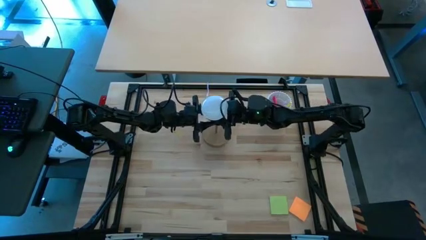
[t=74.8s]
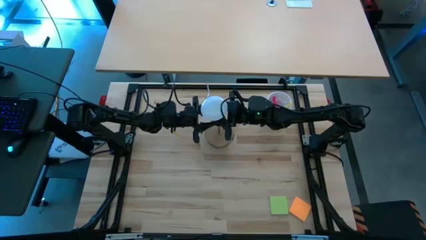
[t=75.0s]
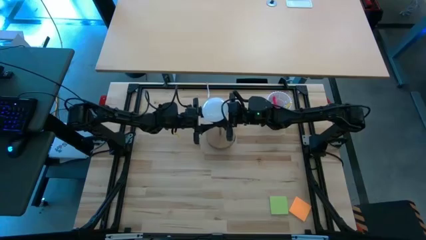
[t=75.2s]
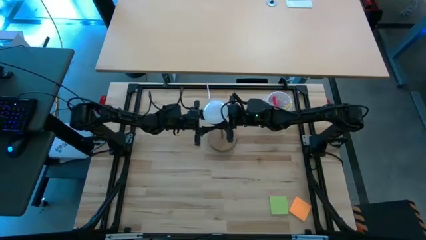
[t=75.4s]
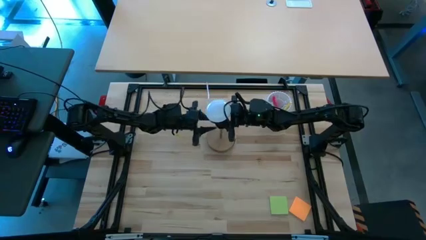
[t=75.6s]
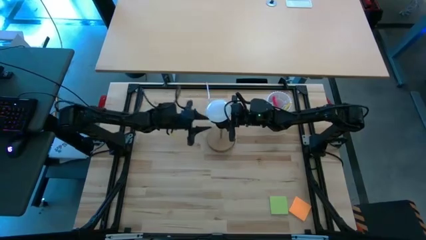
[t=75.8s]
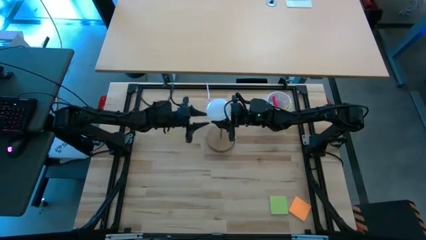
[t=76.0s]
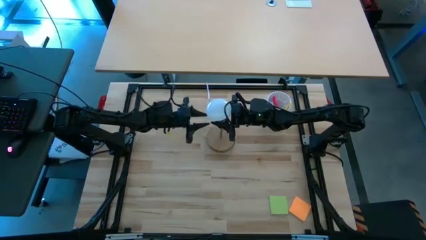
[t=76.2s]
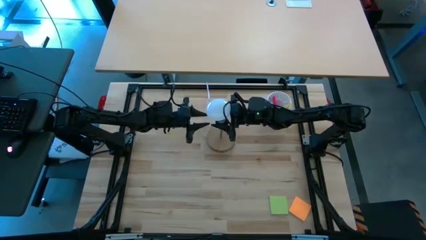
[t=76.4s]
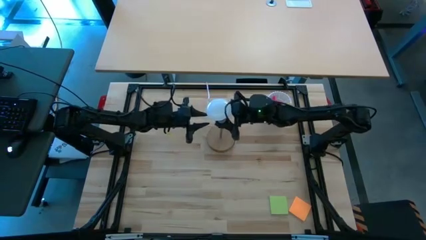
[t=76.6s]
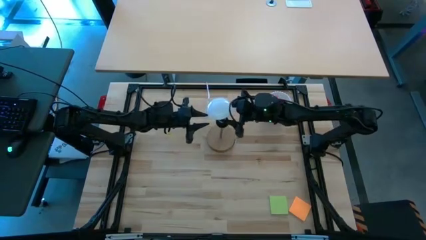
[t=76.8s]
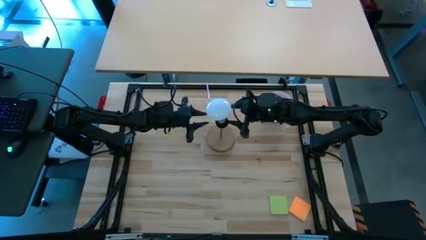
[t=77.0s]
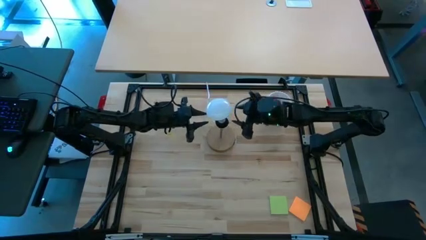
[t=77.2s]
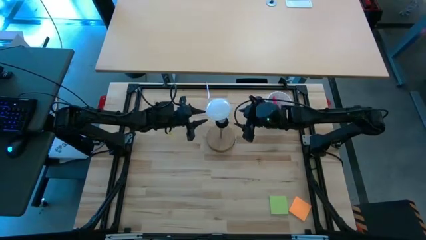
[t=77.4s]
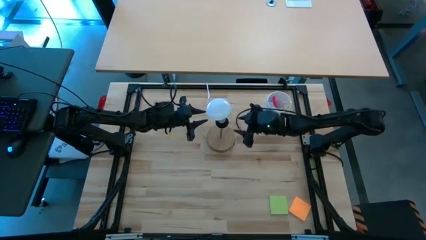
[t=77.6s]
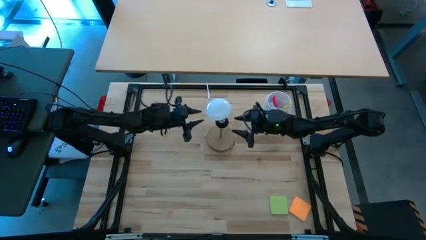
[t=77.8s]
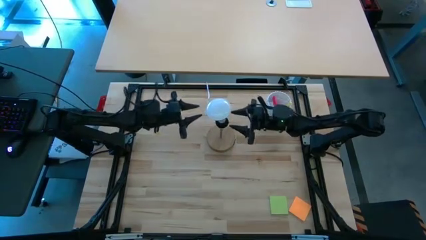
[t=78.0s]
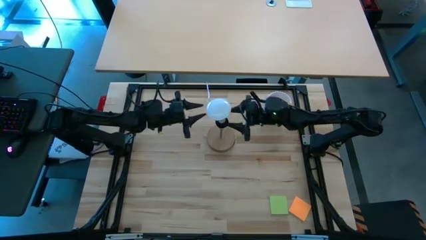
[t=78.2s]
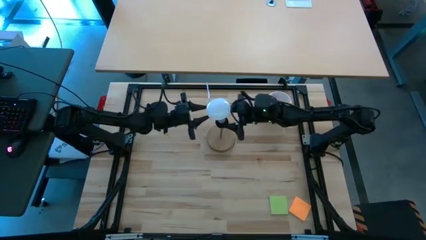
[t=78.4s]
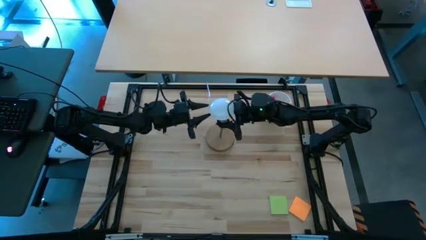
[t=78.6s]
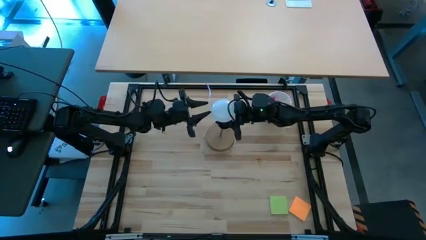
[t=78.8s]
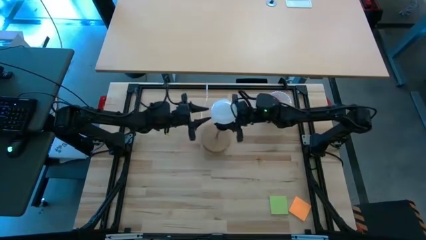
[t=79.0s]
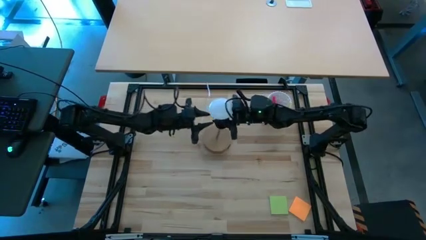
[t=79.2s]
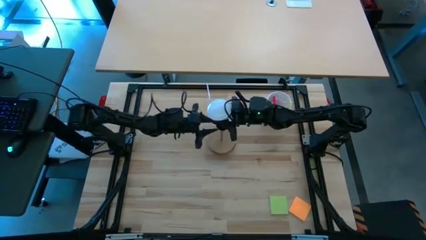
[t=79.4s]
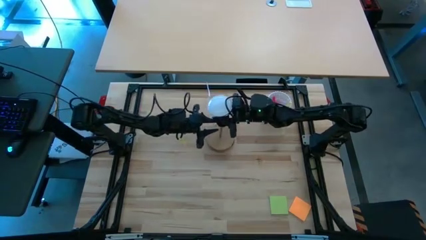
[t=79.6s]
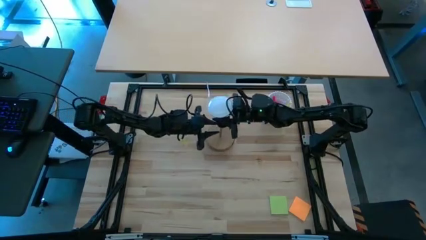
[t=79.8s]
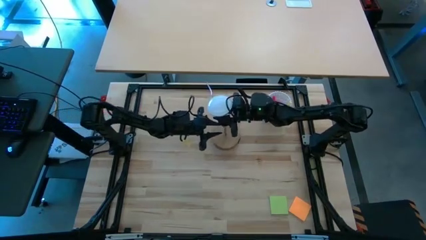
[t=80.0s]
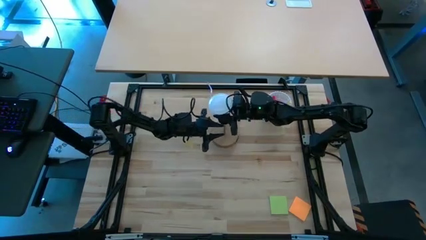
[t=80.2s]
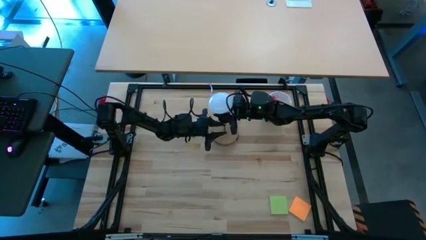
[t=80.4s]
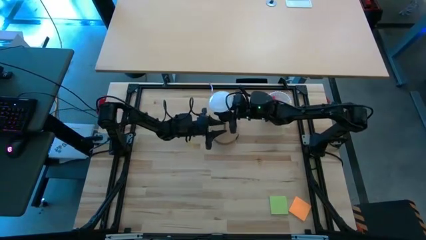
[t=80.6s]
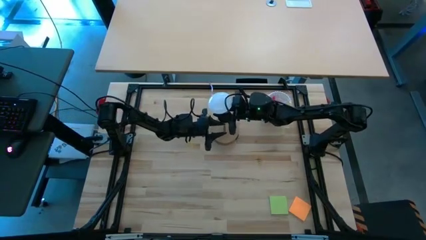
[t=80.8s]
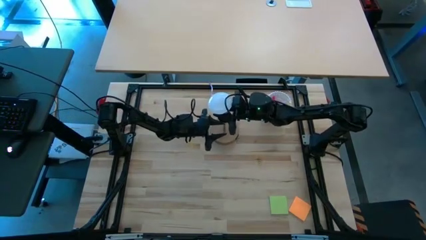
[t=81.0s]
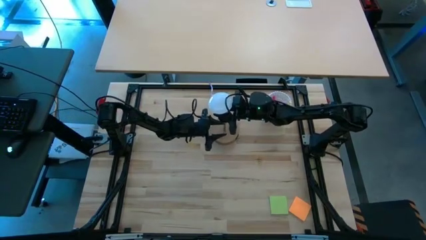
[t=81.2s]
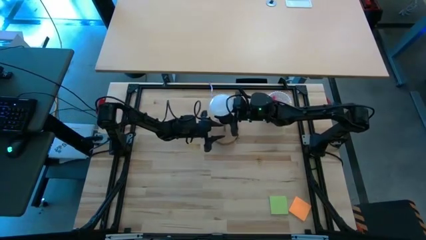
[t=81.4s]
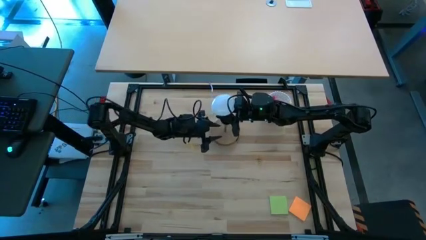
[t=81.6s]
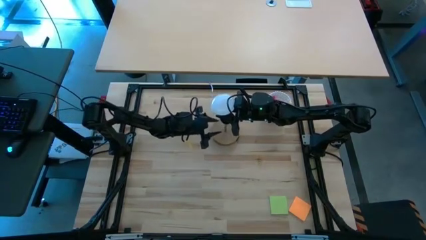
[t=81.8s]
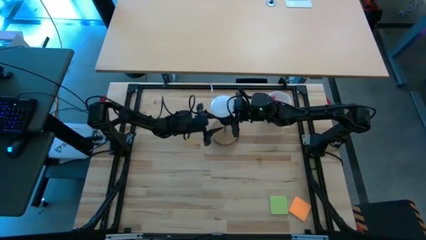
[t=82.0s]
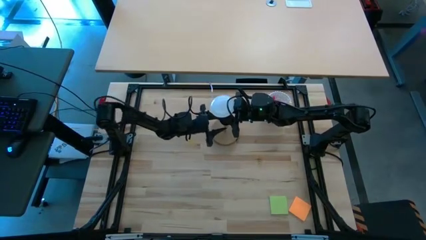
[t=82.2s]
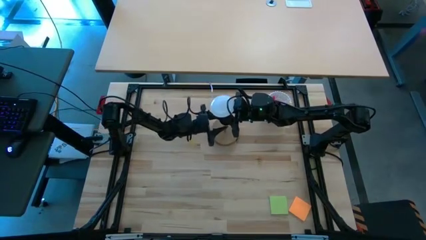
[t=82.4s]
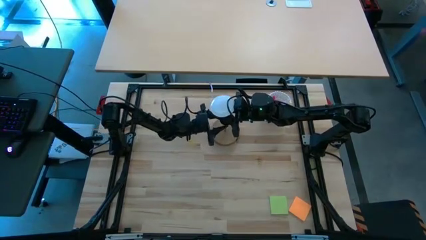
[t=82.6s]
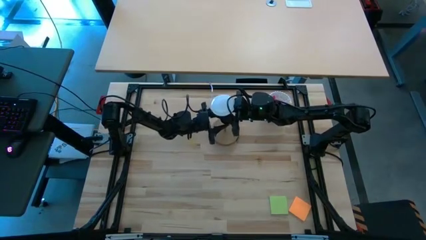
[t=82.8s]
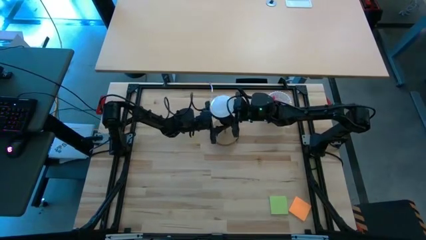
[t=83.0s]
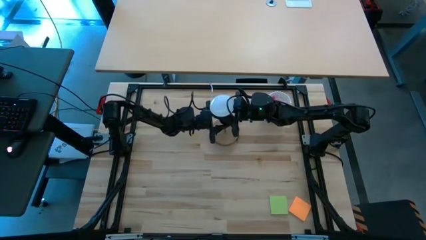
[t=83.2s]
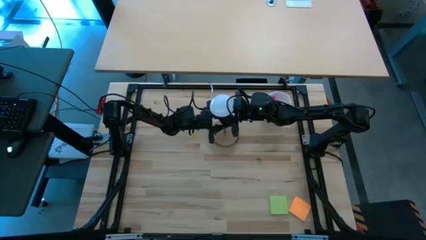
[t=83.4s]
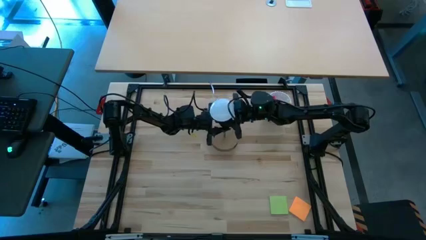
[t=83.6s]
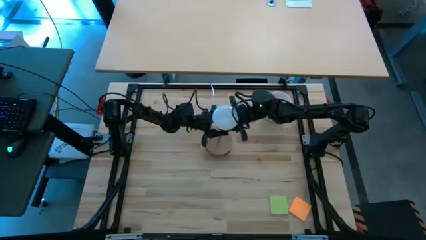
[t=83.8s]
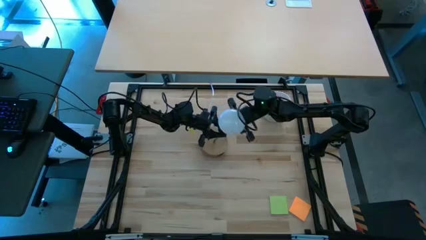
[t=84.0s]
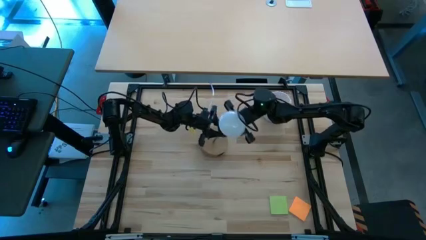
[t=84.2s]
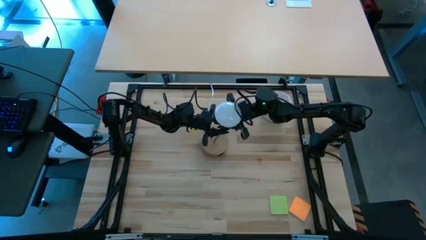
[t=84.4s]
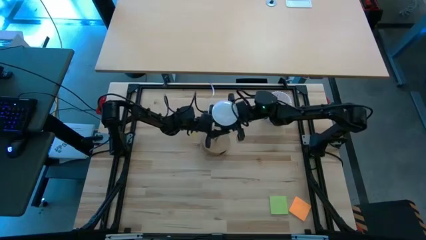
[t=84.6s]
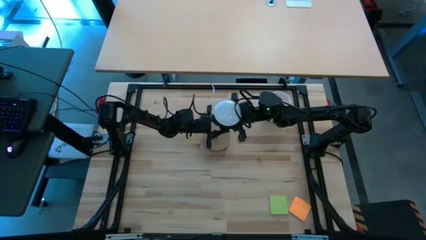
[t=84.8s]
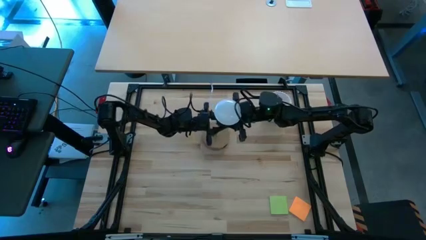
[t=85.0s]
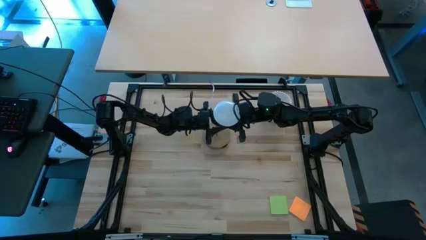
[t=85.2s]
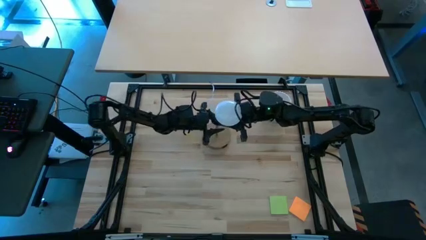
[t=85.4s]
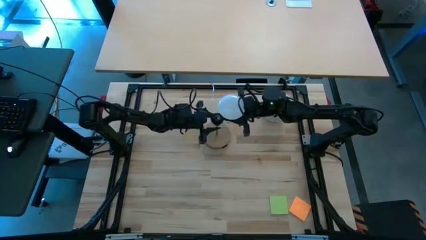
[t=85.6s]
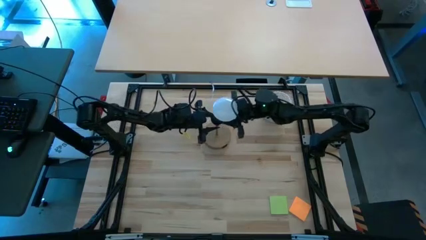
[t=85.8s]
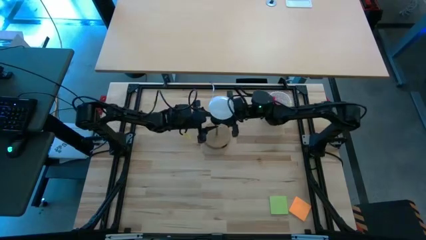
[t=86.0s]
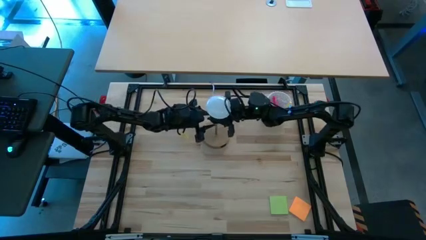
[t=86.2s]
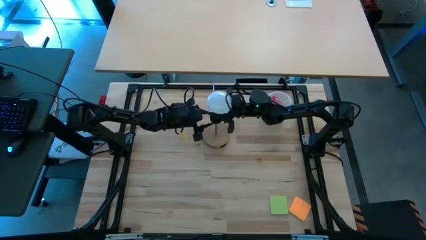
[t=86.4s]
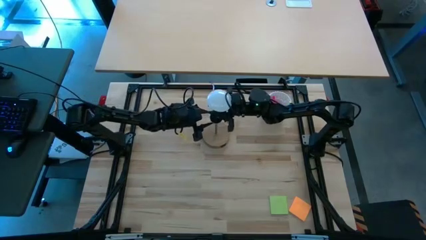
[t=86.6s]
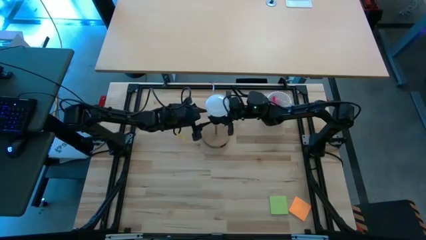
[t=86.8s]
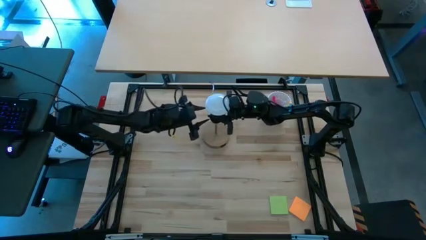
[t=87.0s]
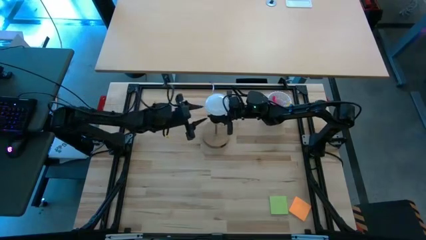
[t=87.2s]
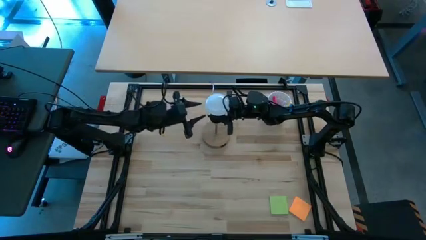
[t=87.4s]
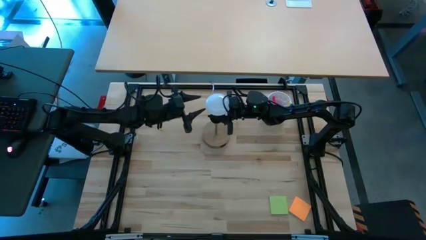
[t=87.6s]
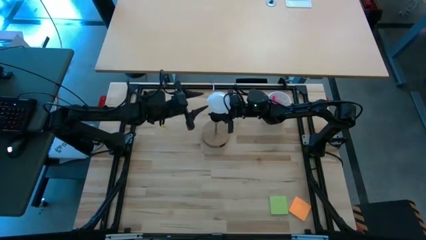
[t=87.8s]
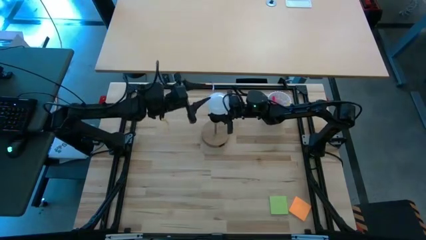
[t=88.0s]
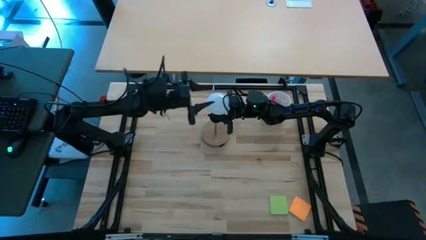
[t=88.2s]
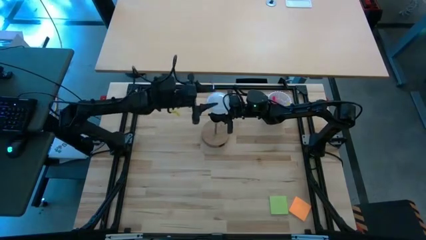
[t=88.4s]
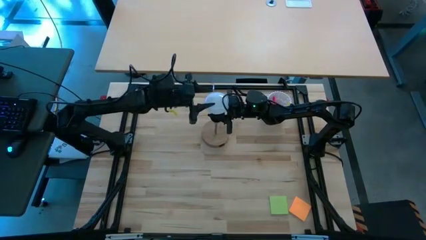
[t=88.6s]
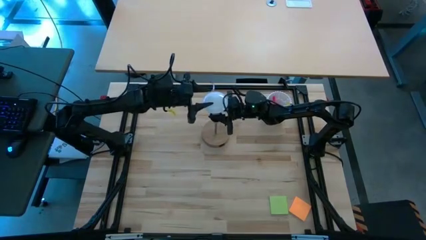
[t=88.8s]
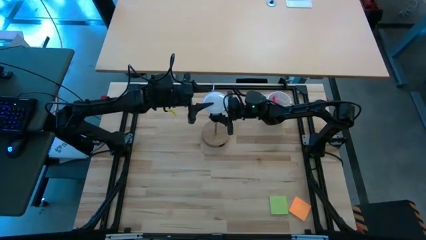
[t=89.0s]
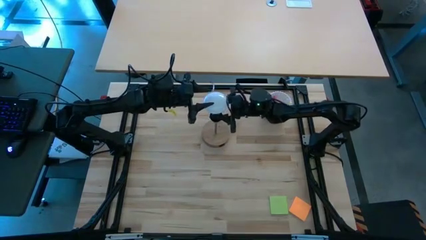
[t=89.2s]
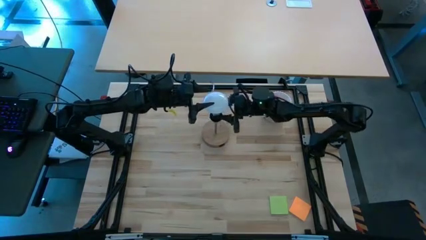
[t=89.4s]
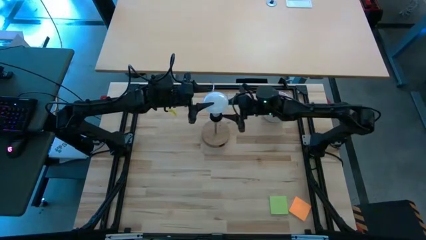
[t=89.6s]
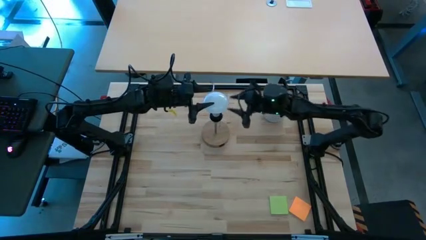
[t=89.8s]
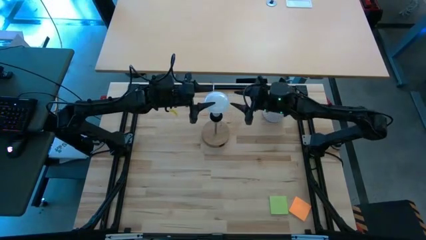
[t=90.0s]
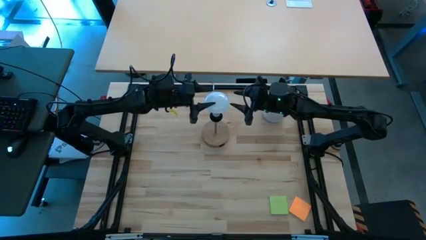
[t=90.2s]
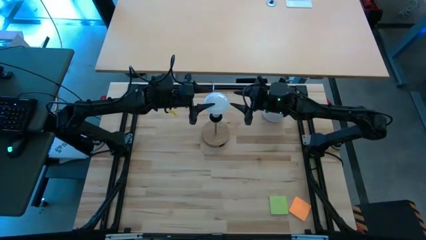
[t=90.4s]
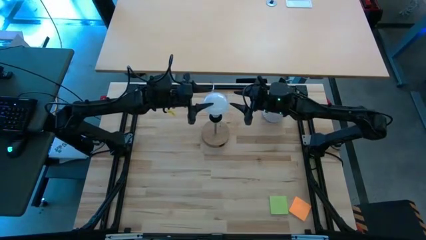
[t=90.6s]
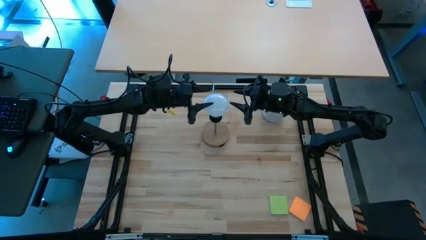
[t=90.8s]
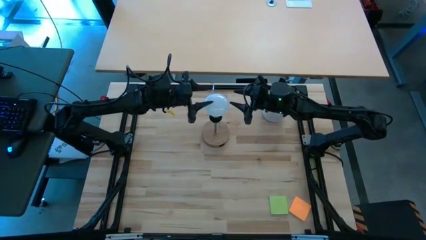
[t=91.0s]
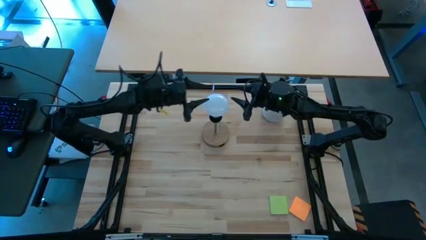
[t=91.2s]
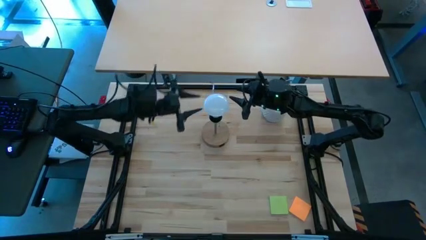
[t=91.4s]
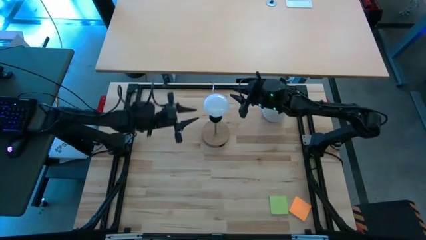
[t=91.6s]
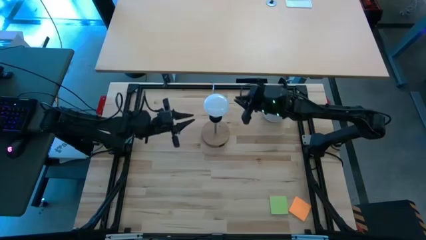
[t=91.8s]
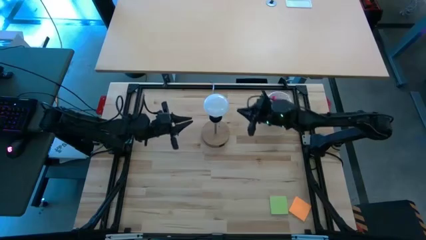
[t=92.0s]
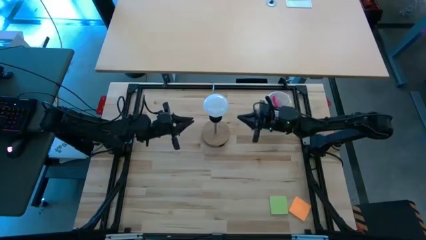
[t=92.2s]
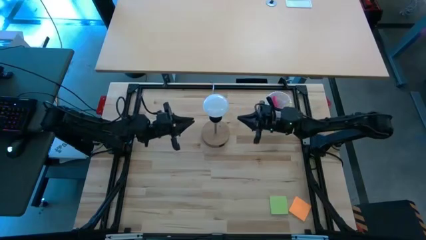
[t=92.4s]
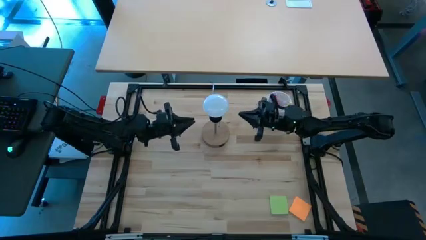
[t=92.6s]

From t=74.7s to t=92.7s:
Task: Screw lightbulb
Insert the white lightbulb into the desk lamp
